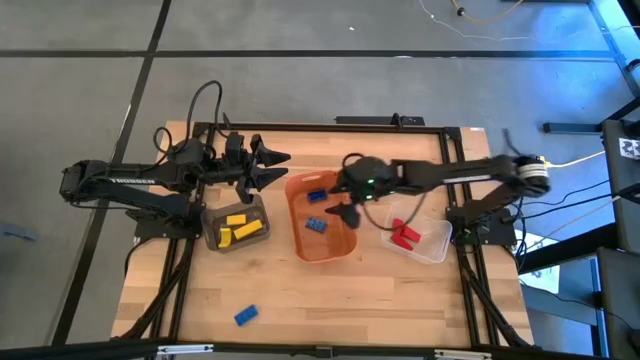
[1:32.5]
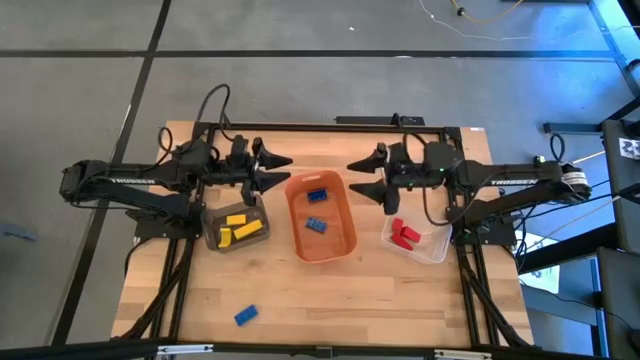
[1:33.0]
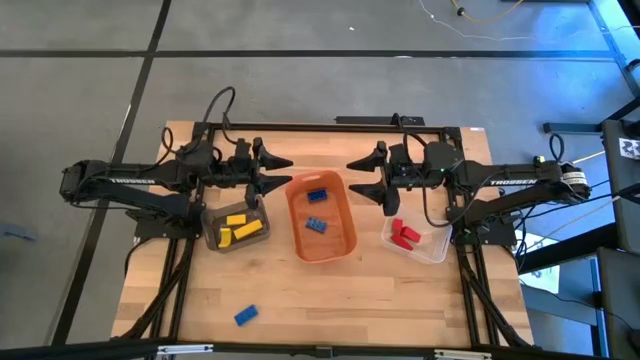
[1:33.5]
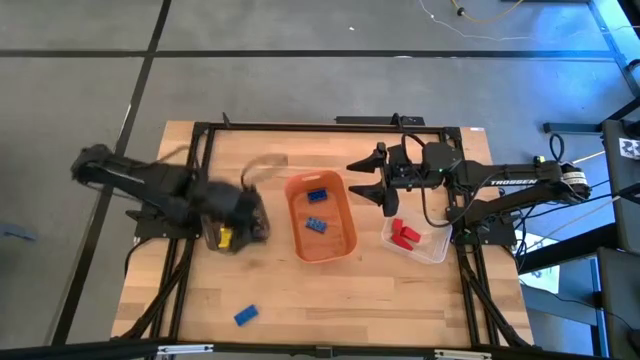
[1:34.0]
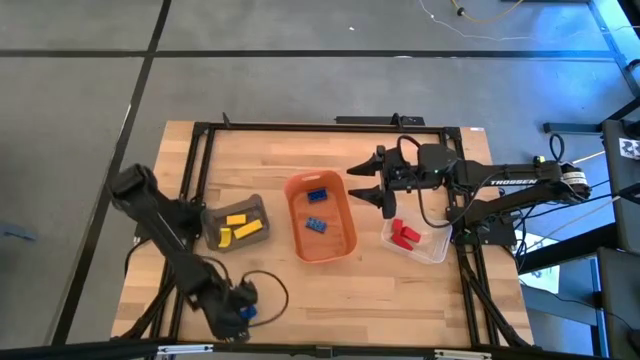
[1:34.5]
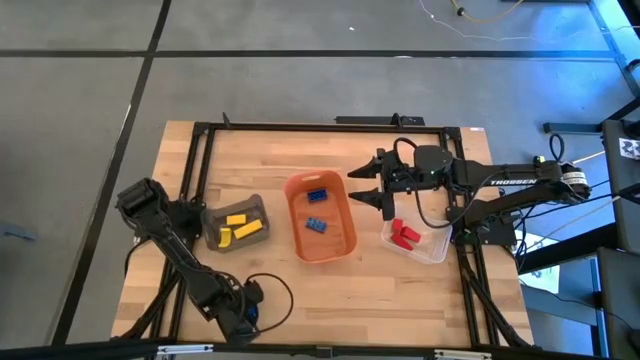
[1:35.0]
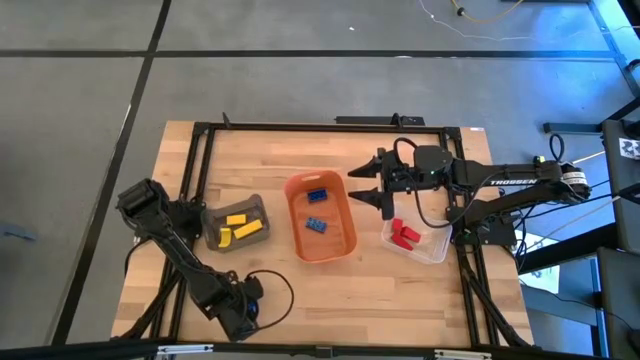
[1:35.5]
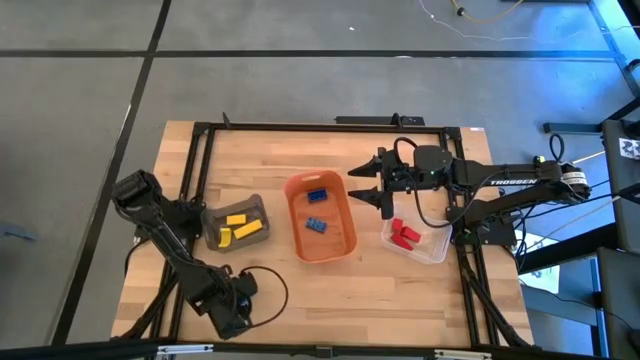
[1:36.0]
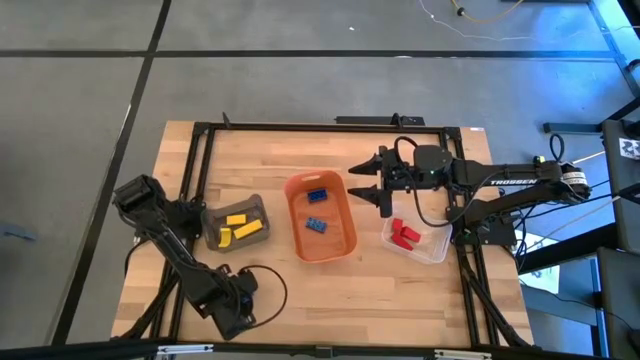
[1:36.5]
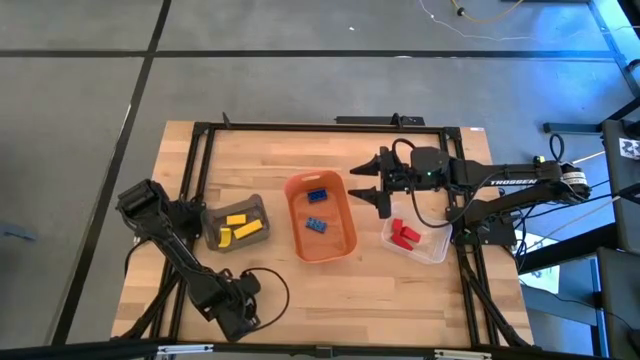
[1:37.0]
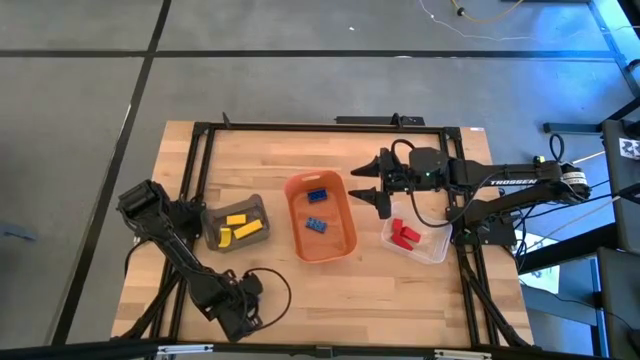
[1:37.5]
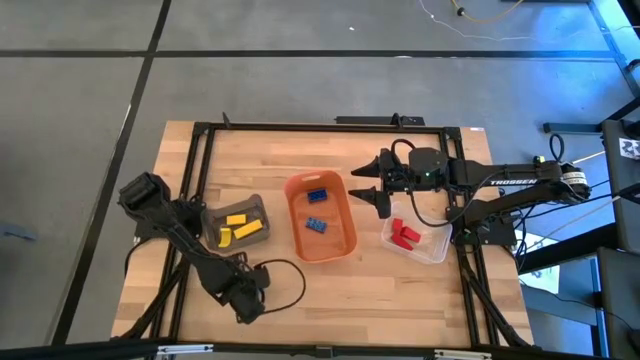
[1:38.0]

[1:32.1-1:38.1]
Task: Sort & place blocks by color
Put the blue game piece into the orange bin

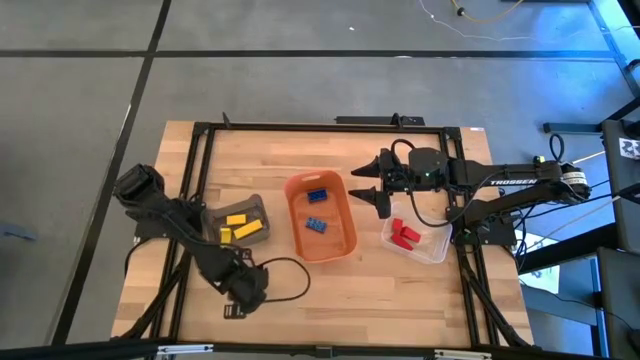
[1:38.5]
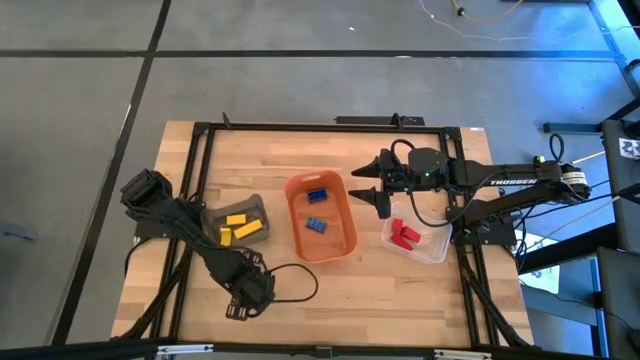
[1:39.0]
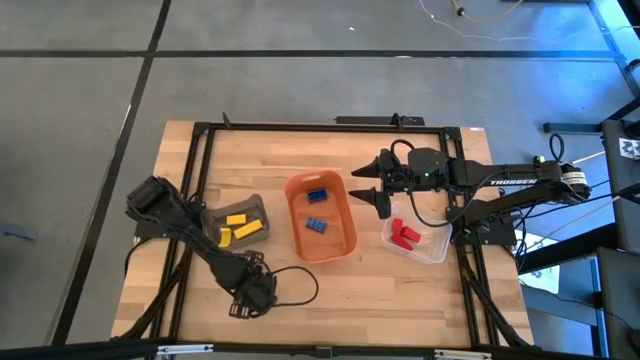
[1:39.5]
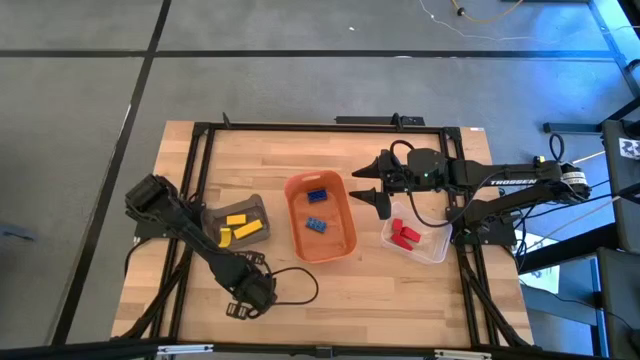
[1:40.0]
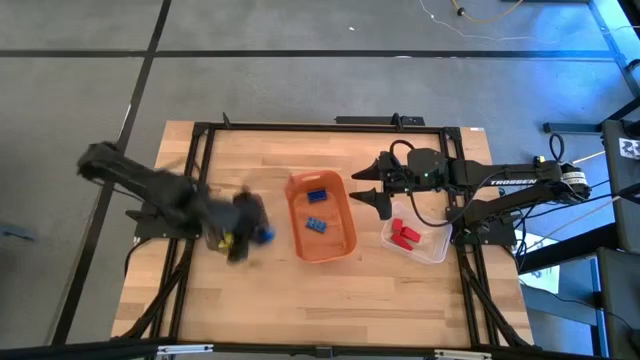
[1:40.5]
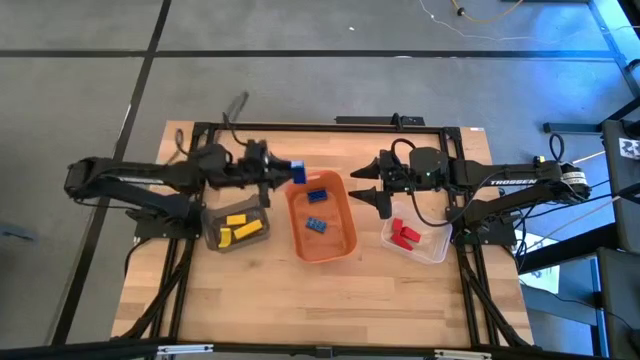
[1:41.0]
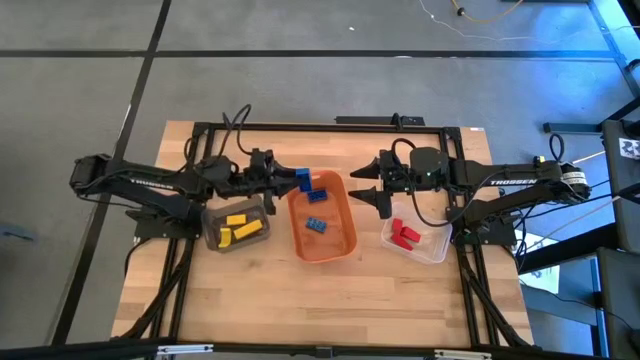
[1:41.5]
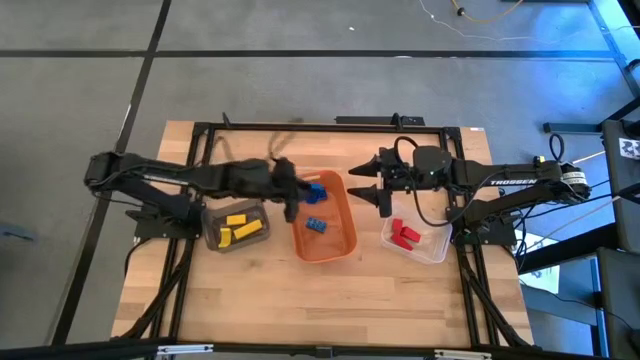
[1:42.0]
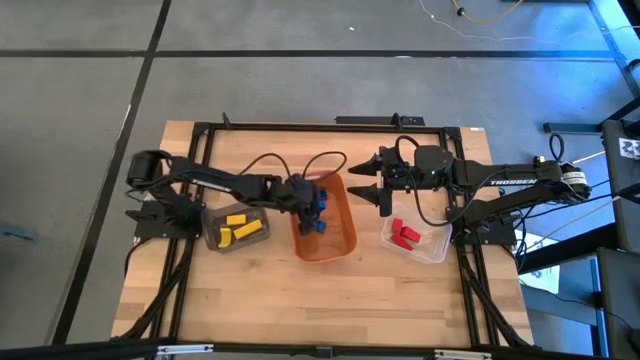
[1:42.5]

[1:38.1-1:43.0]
Put the blue game piece into the orange bin

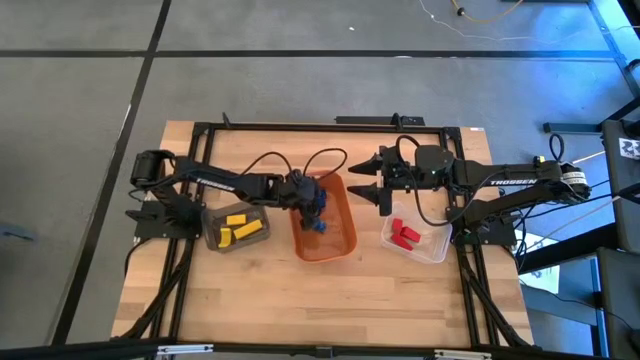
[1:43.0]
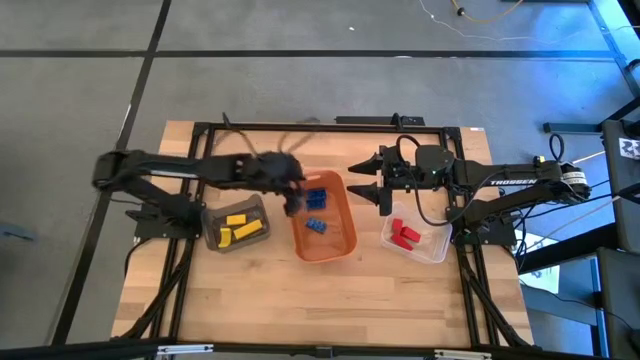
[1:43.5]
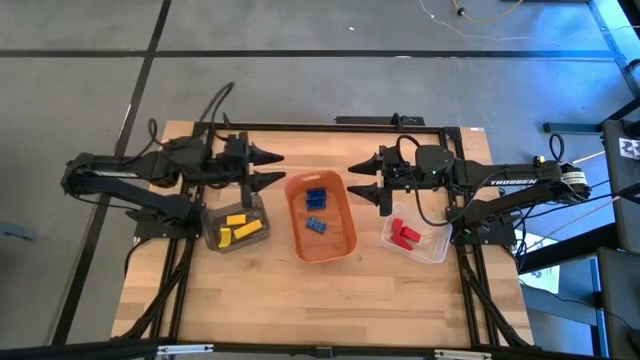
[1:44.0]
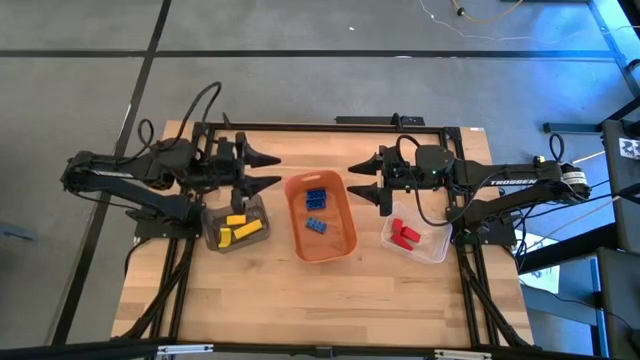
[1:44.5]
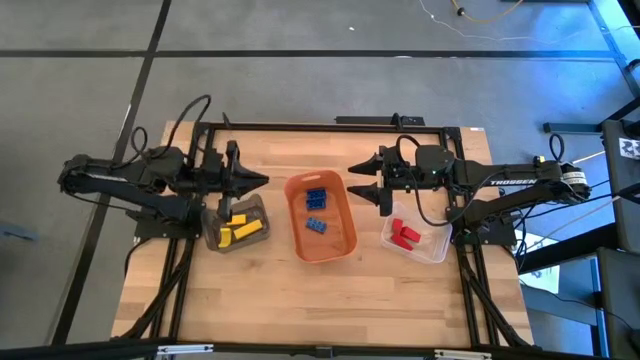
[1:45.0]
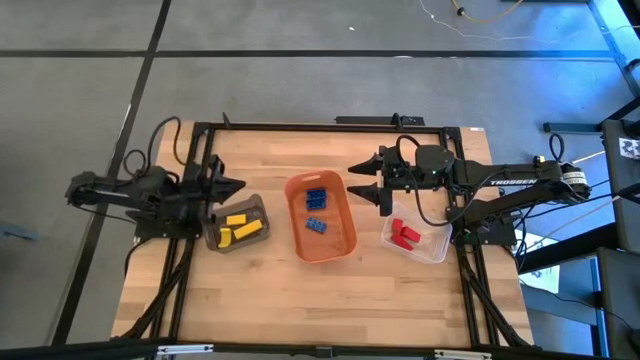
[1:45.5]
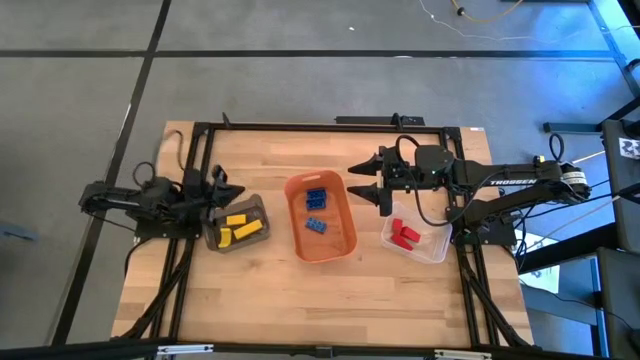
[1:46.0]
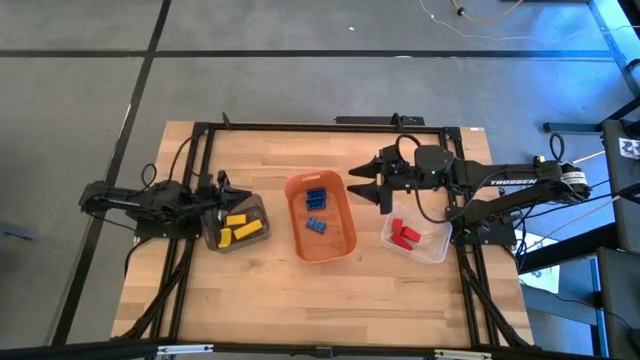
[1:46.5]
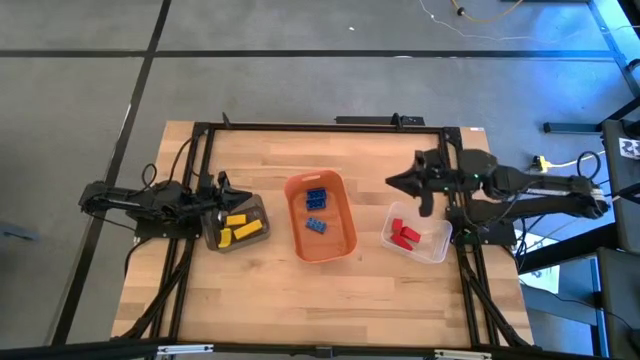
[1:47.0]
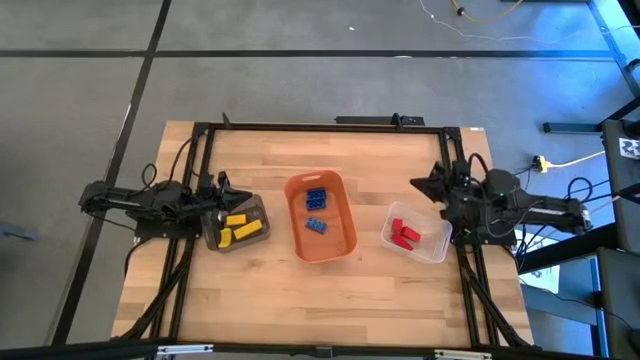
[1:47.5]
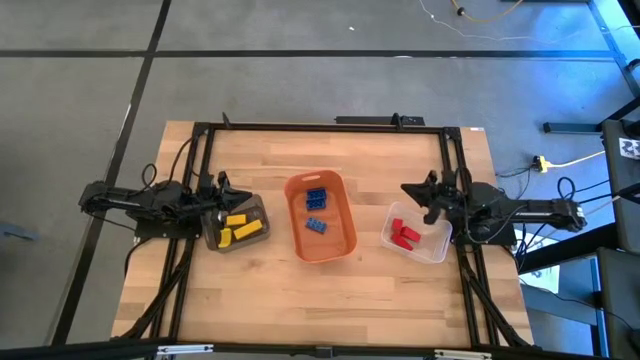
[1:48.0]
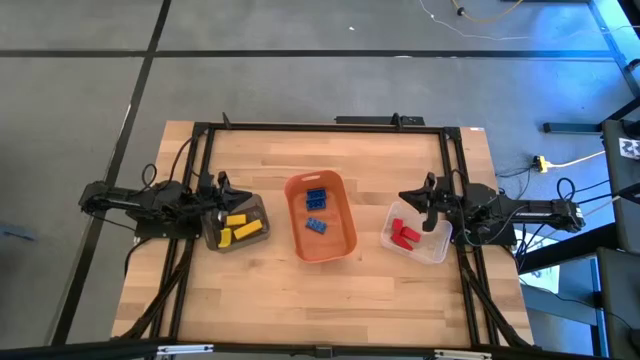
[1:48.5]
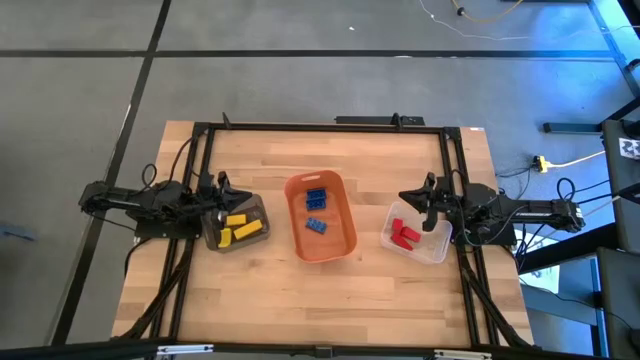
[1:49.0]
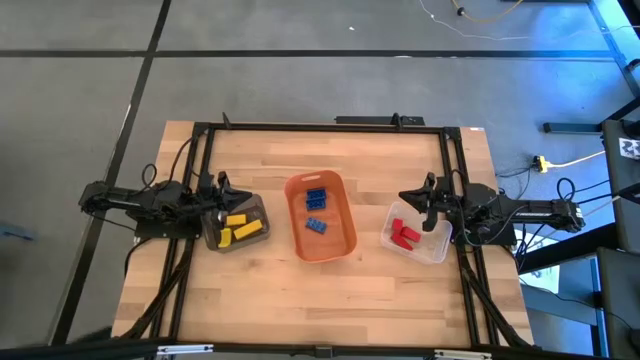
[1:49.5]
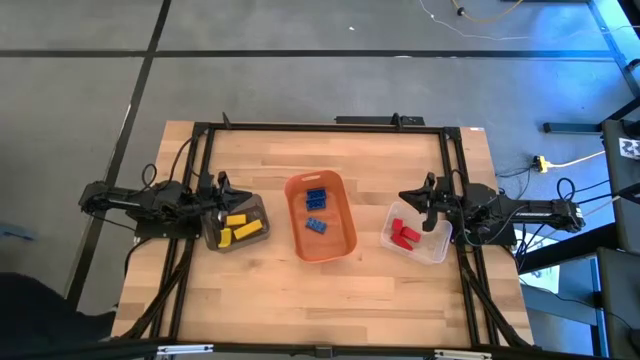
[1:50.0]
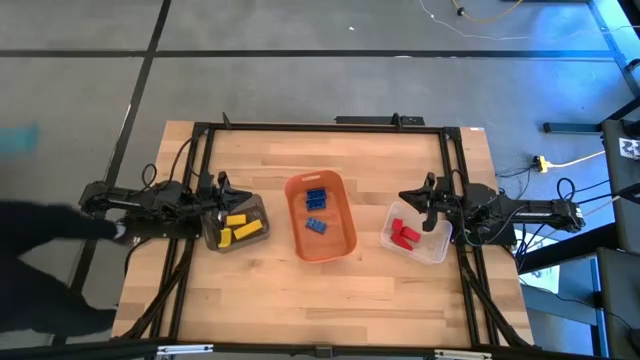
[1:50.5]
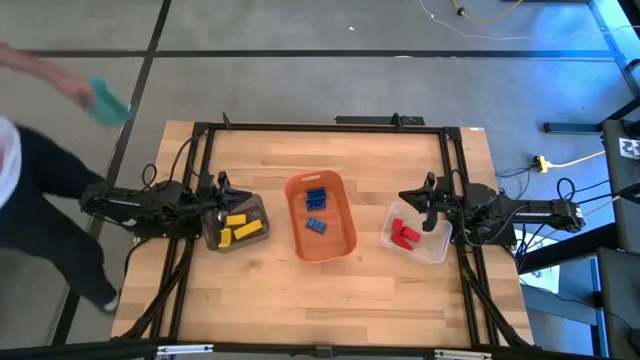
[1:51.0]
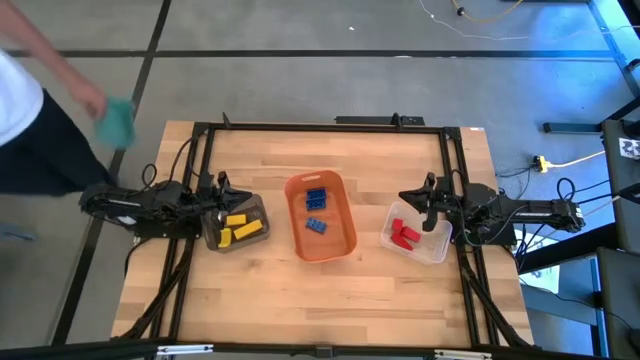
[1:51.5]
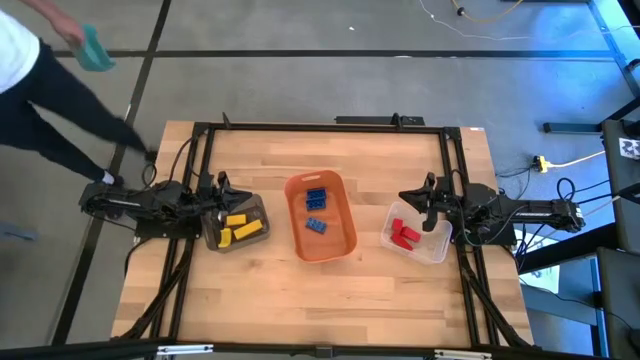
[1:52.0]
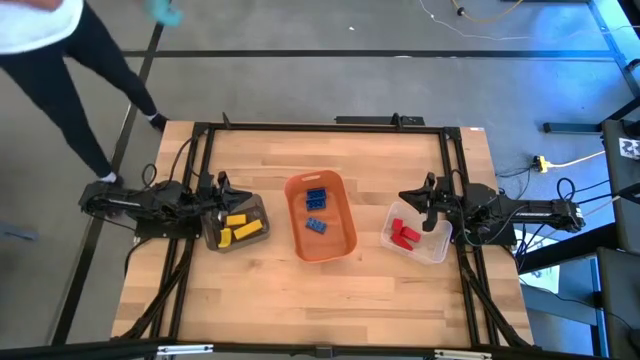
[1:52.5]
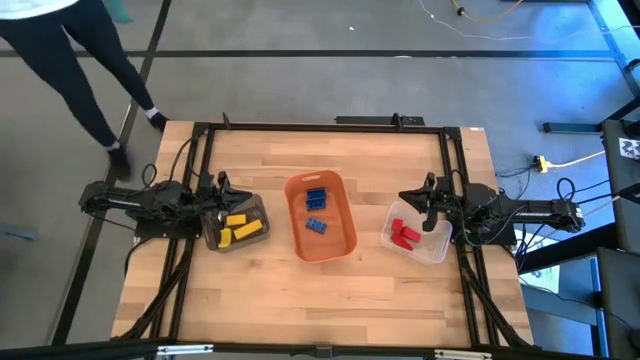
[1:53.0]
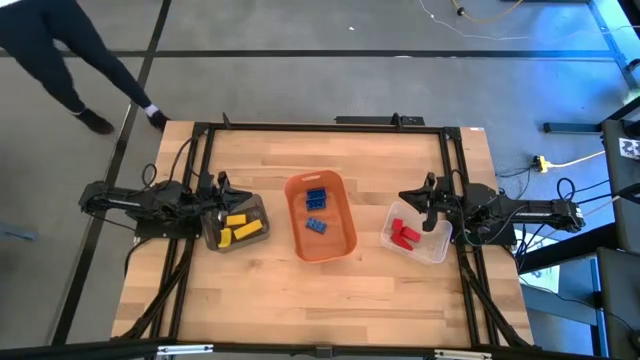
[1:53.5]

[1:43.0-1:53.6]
Return to Home Position

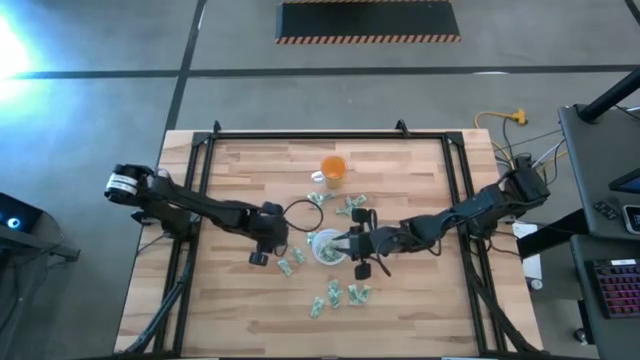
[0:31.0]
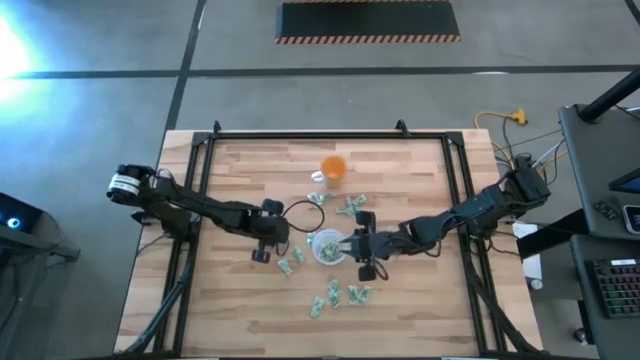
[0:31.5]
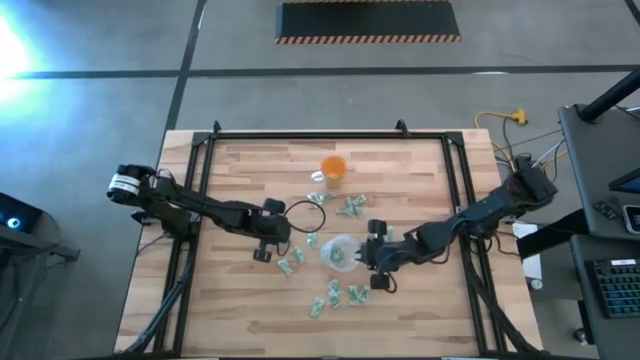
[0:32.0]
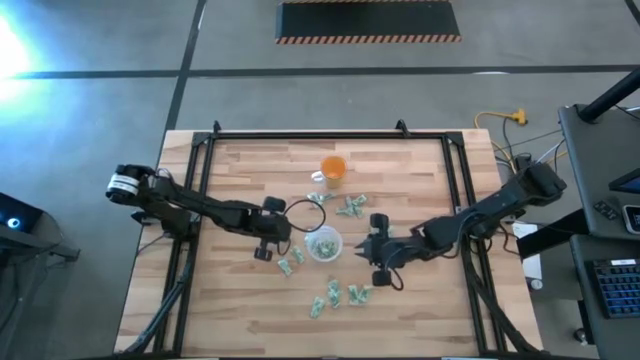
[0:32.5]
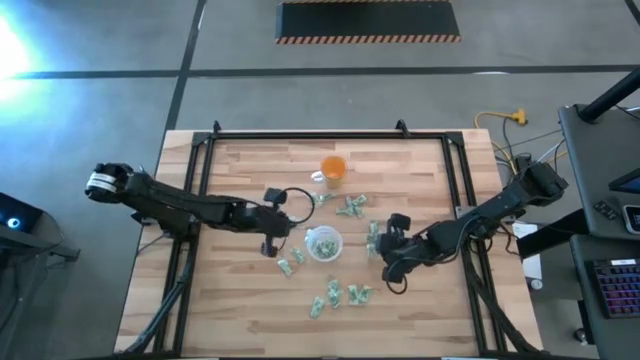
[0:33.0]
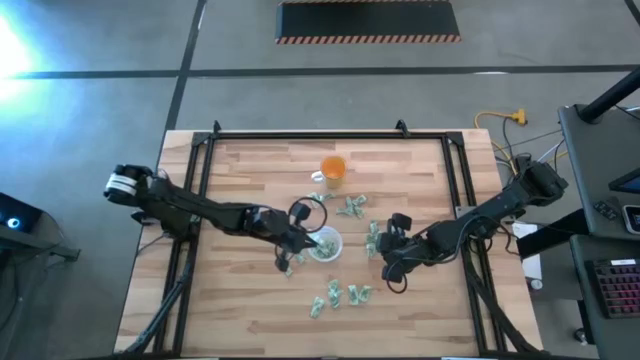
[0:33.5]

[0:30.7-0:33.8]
Task: Pick and place Stevia / Truvia into bins
Put the green stevia packet into the transparent container
